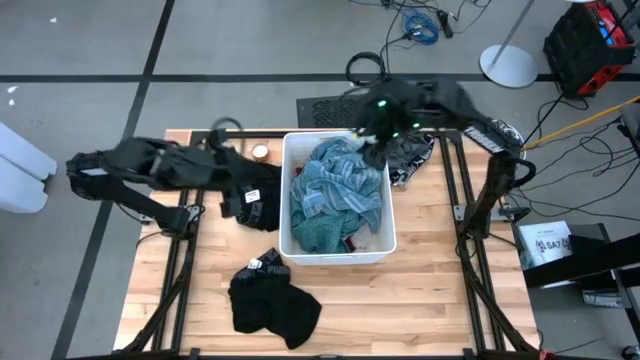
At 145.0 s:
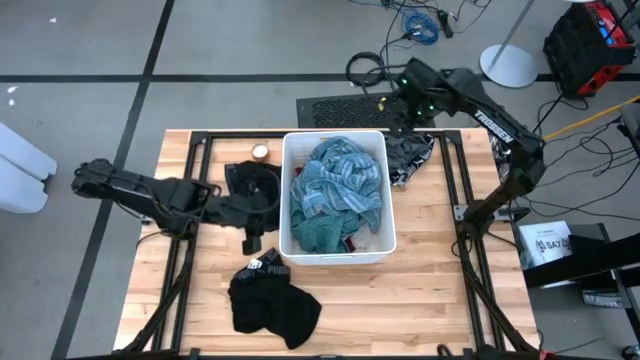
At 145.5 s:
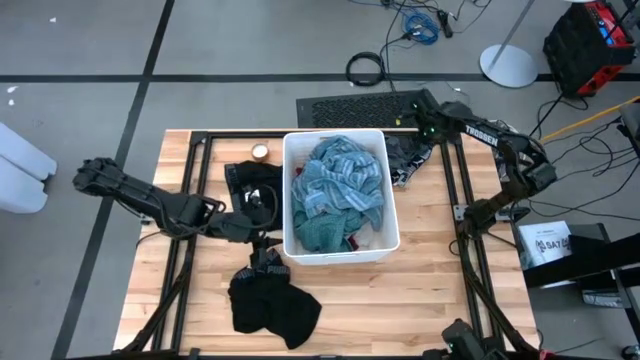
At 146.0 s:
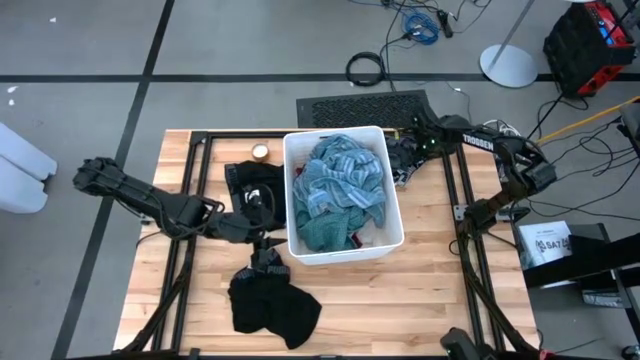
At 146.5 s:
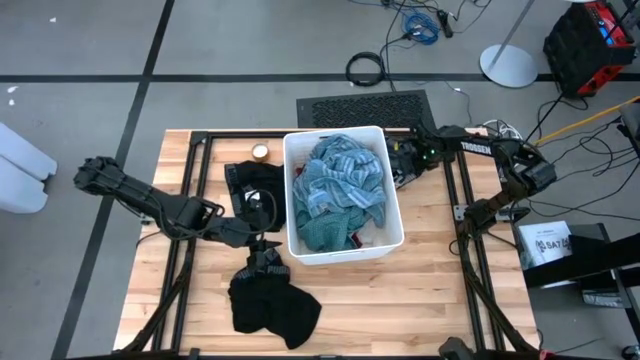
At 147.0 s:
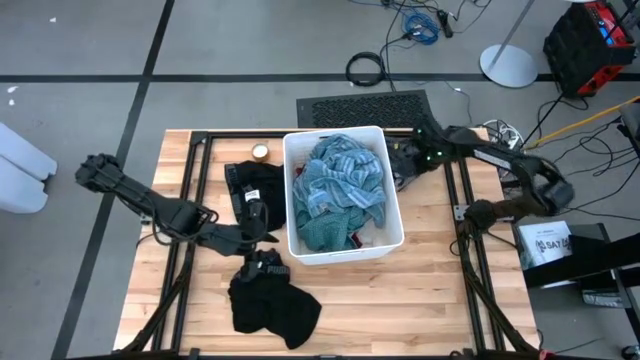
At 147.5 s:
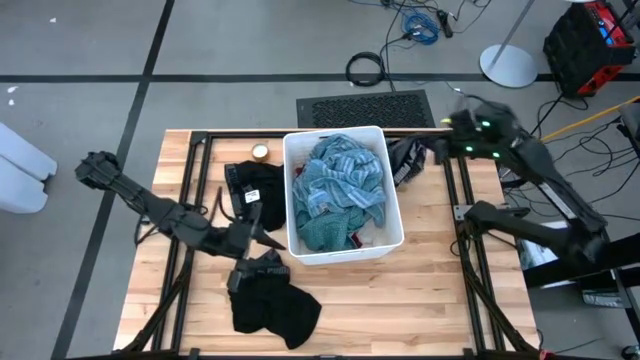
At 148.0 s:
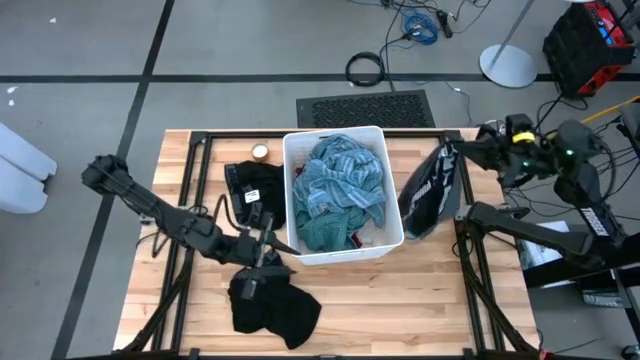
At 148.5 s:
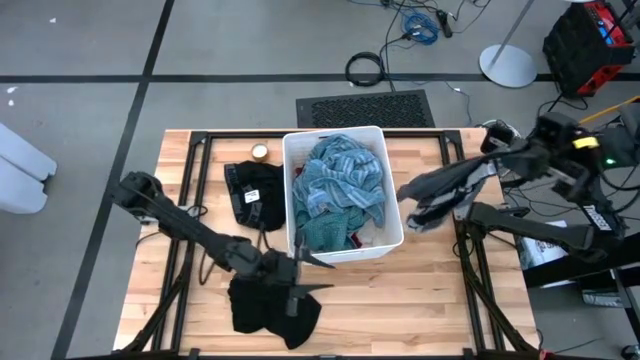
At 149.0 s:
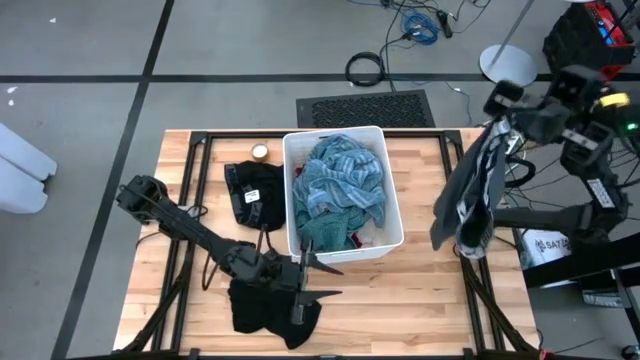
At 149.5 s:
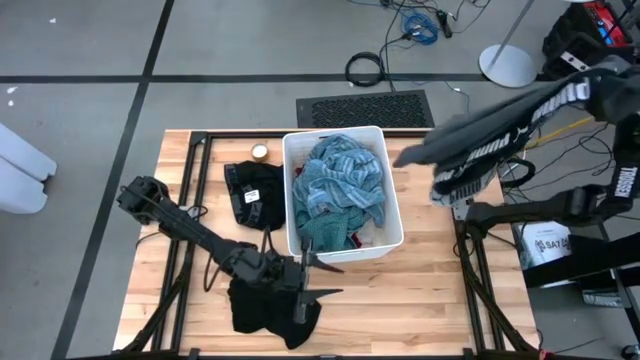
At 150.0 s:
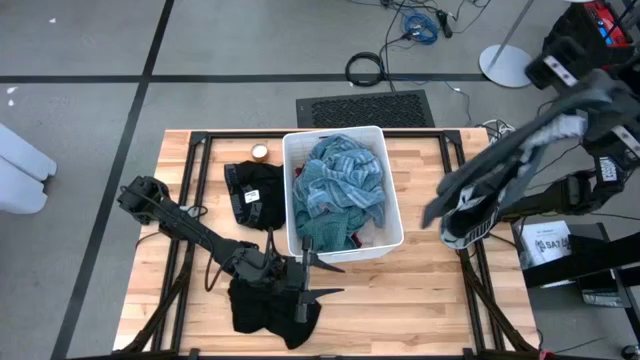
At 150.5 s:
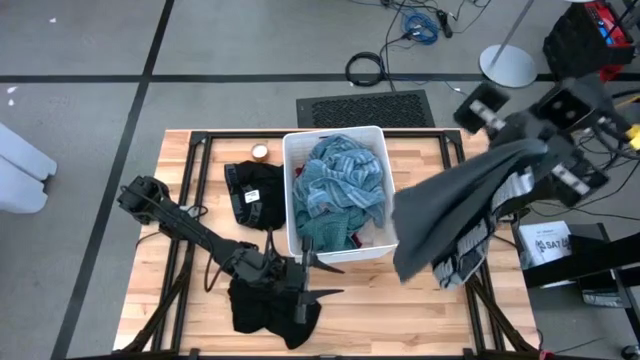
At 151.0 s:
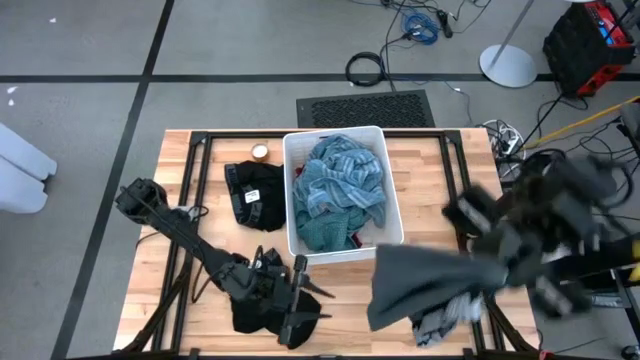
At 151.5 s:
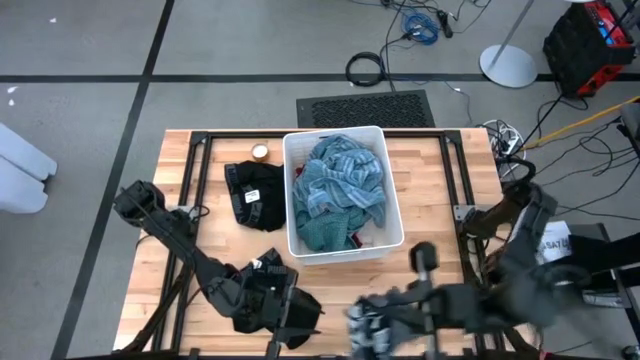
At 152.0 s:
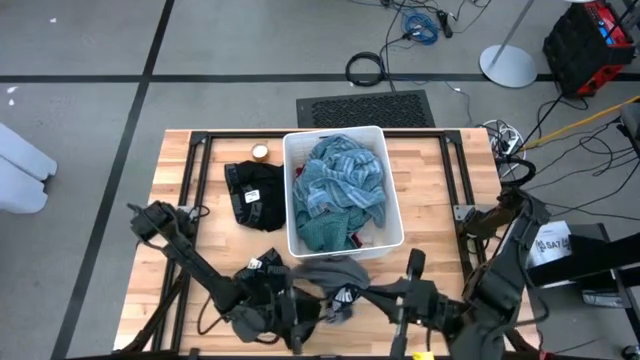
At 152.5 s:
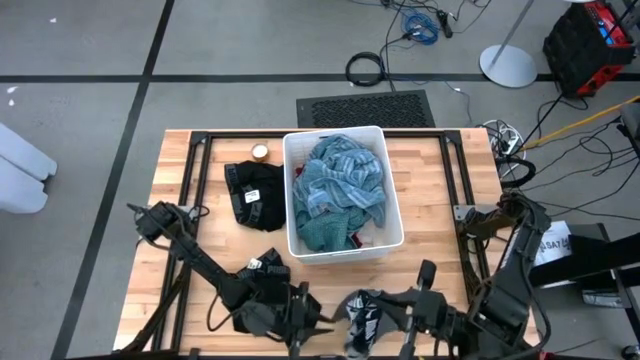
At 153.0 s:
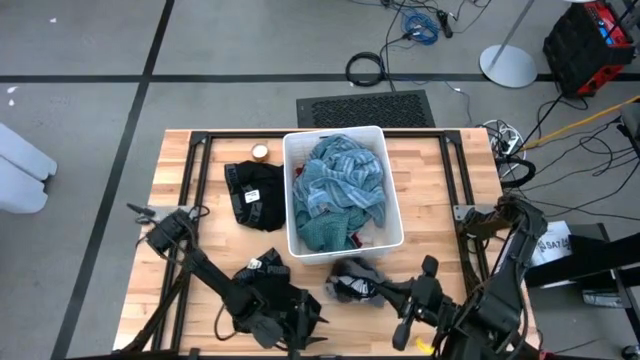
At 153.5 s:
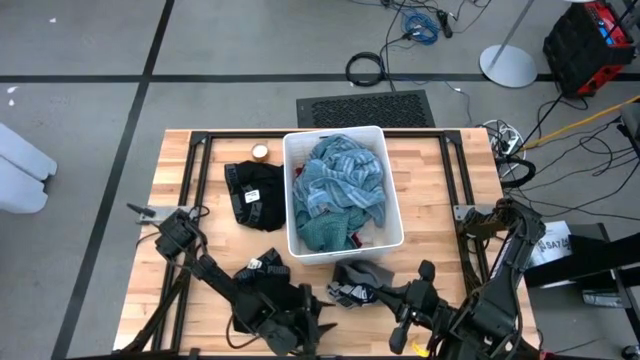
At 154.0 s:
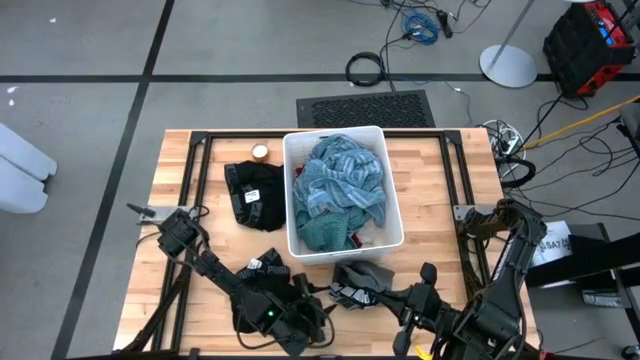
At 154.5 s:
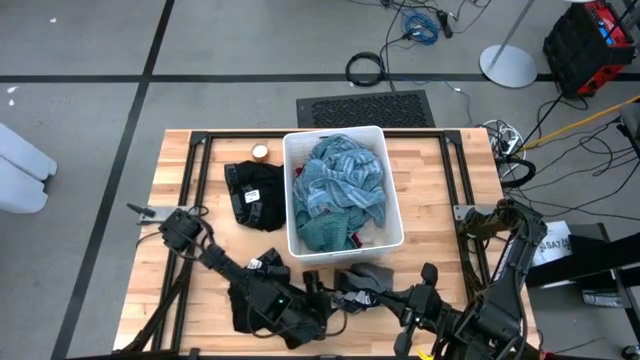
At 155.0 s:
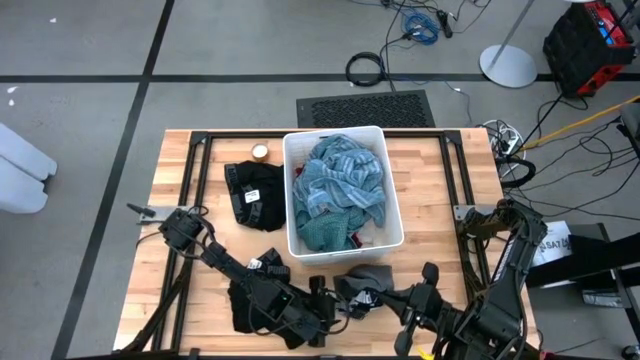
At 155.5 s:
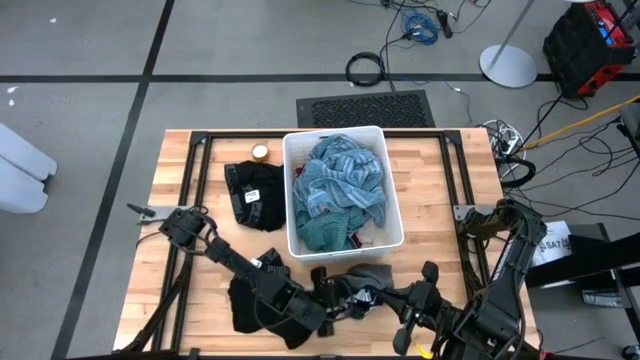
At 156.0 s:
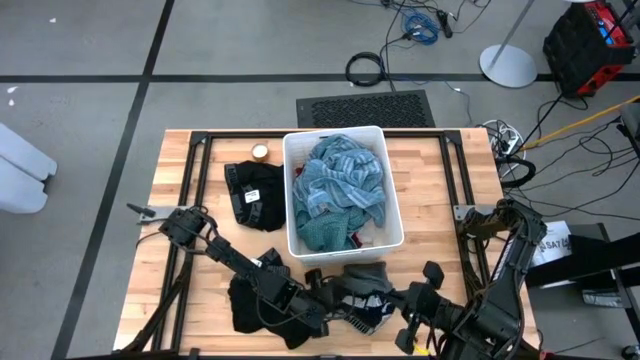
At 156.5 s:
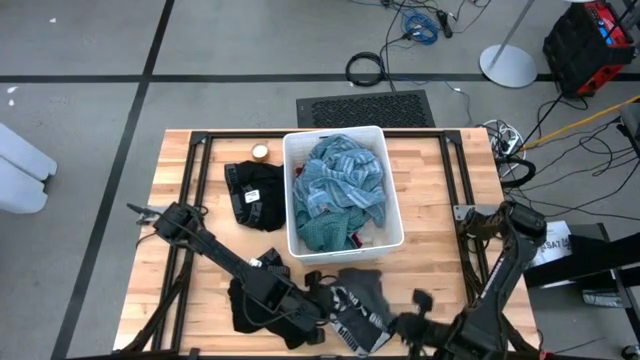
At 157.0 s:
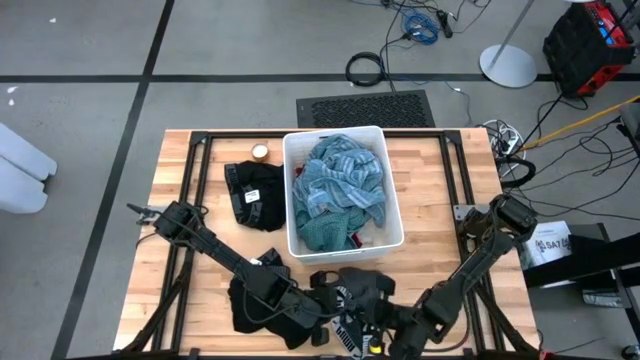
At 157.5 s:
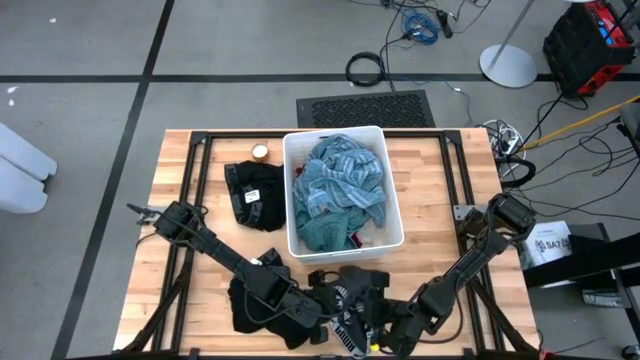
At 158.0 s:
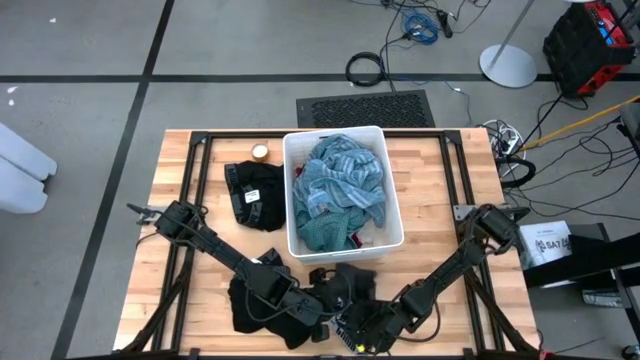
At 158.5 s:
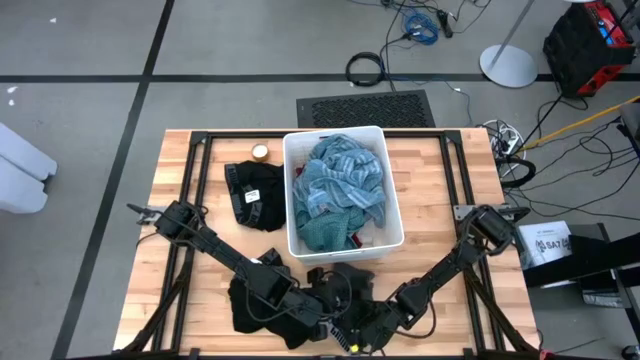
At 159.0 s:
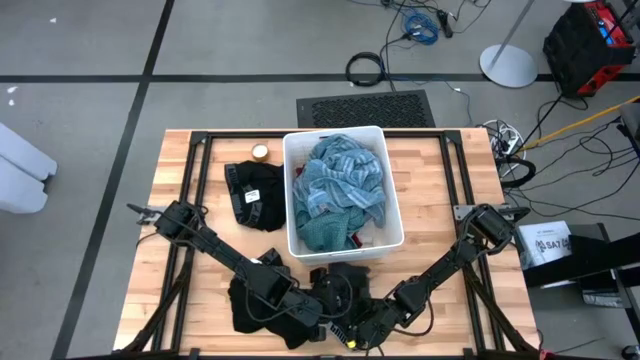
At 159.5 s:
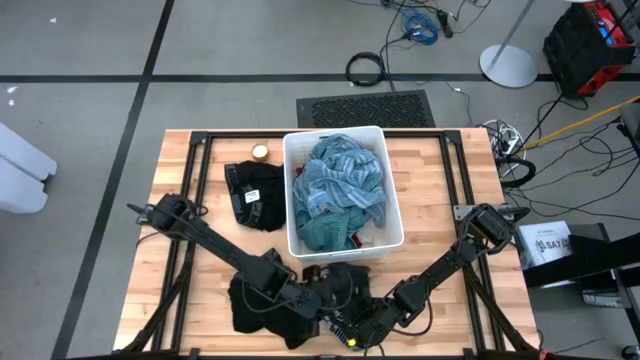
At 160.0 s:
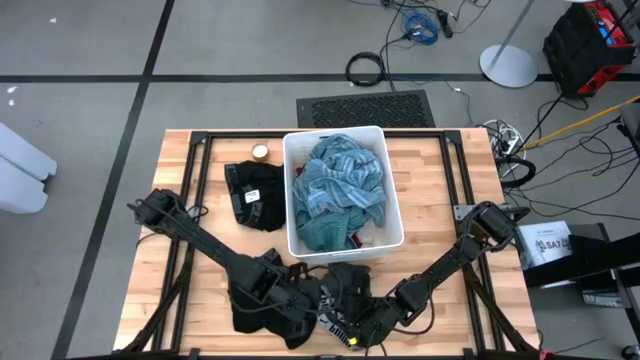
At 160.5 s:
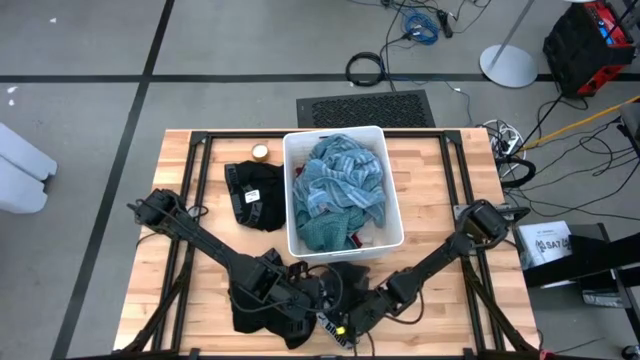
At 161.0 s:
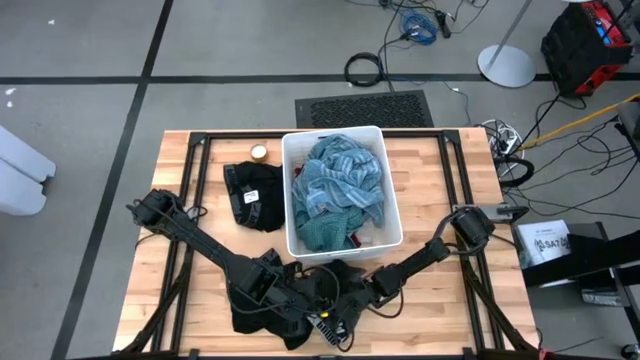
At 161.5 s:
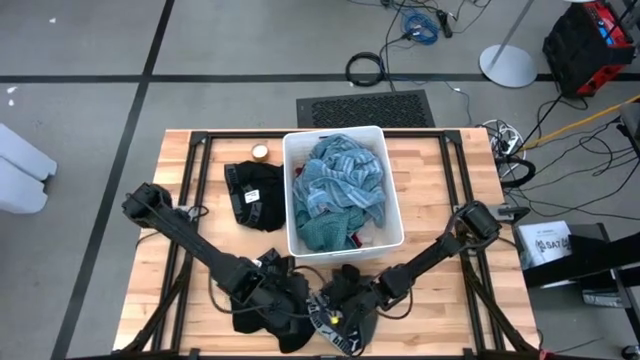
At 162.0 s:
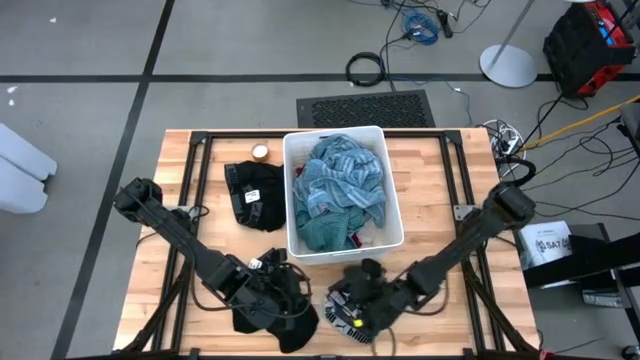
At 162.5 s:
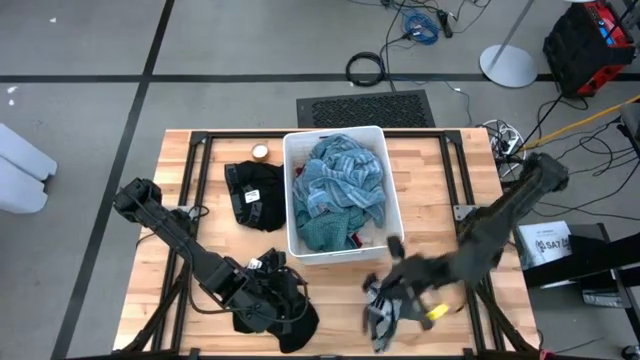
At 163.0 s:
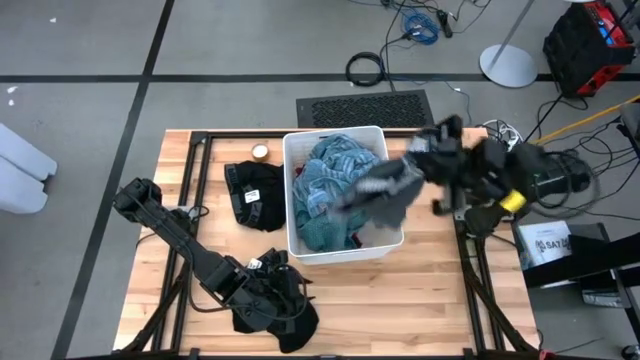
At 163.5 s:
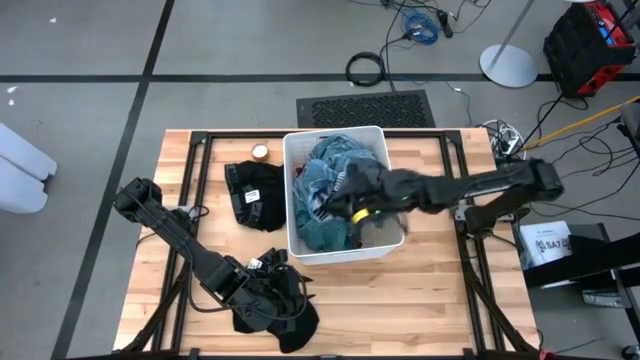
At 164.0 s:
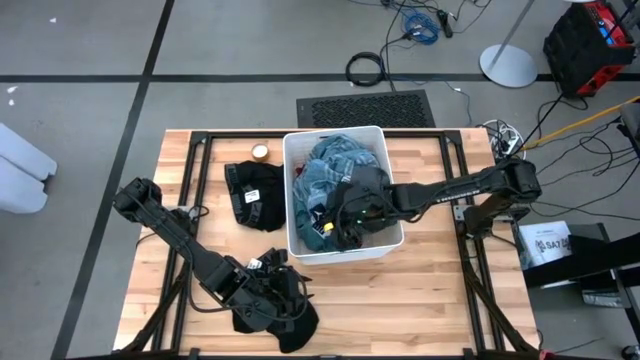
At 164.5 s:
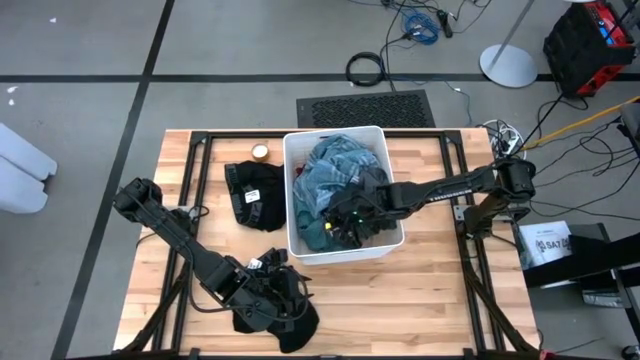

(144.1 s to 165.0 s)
Task: Sort clothes
Put gray boxer into the laundry bin

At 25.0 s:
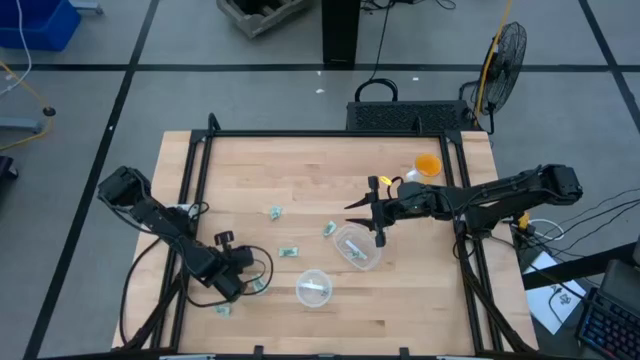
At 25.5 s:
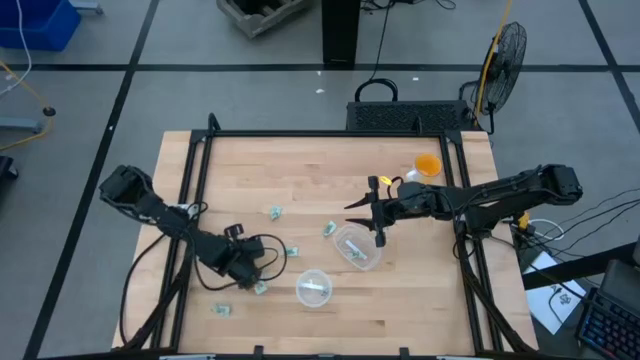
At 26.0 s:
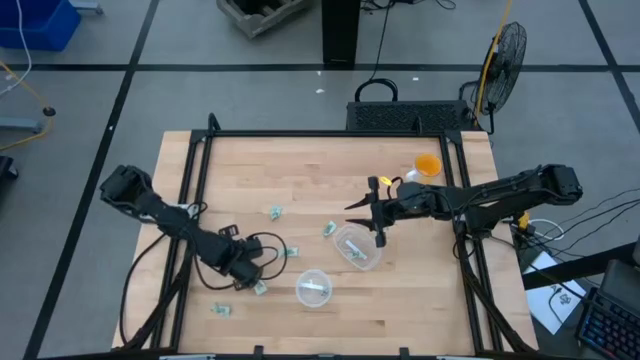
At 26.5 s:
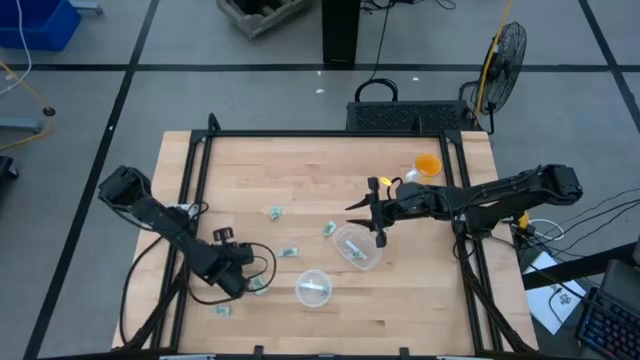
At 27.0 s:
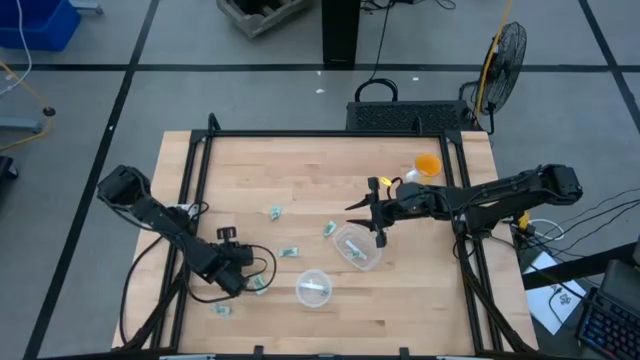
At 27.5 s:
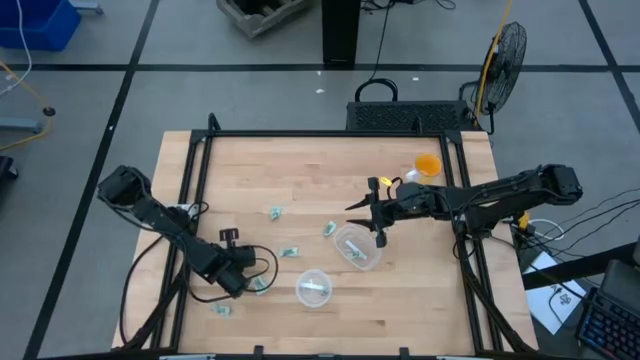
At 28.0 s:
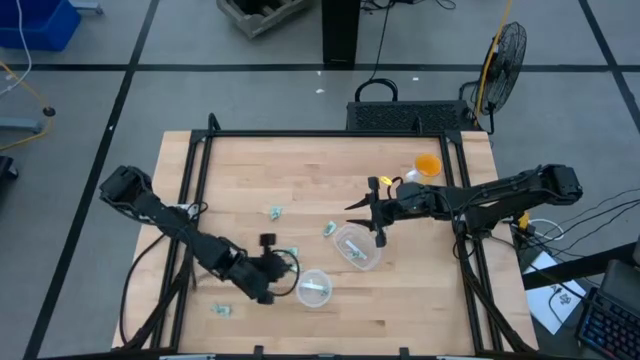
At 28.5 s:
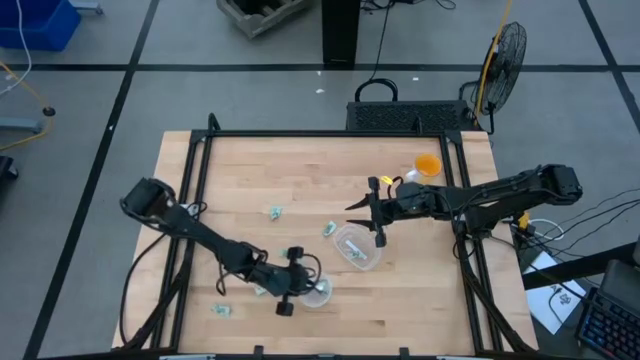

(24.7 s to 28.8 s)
Task: Pick and place items into bin
Put the Stevia packet into the left transparent bin
